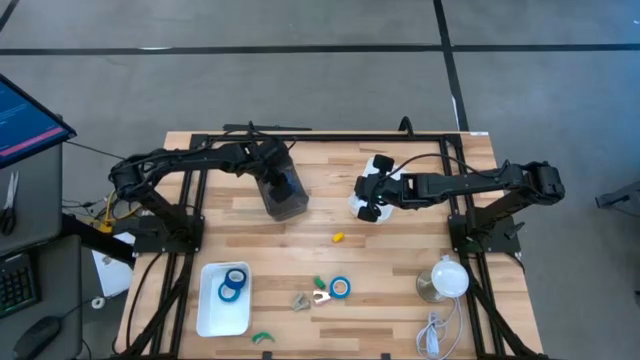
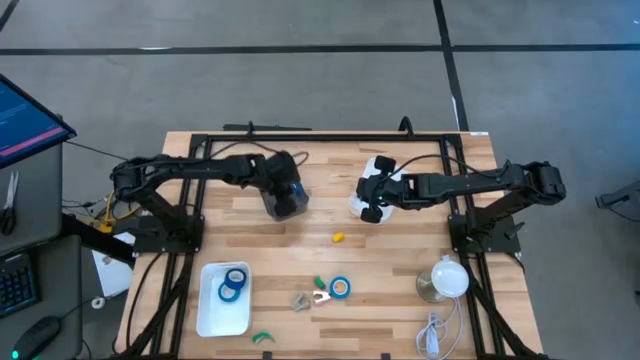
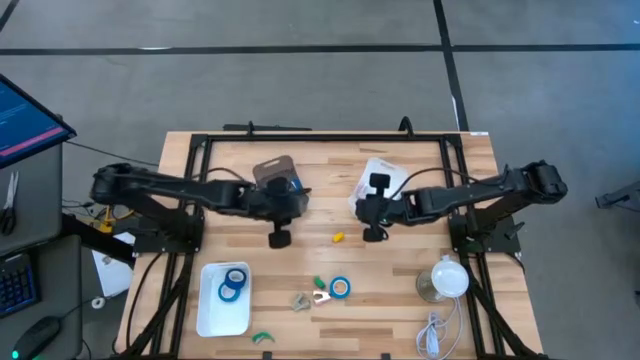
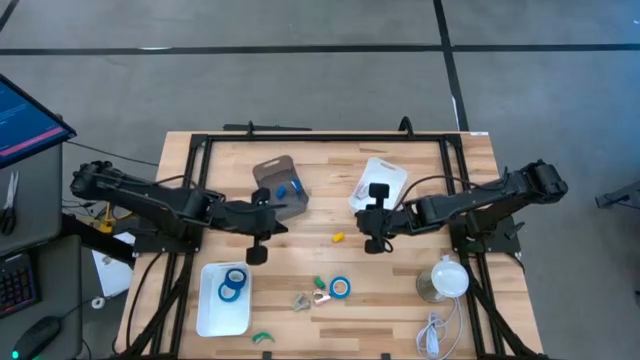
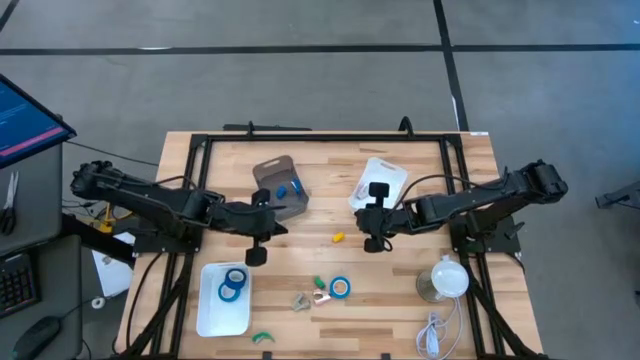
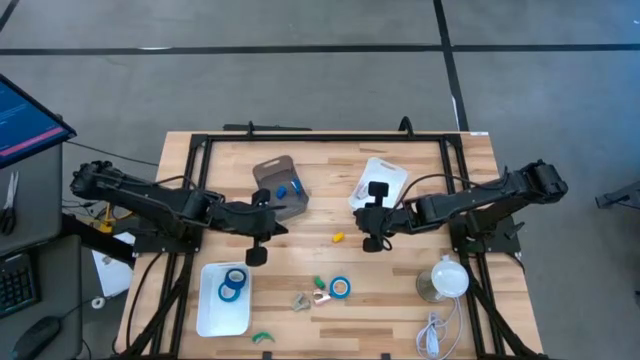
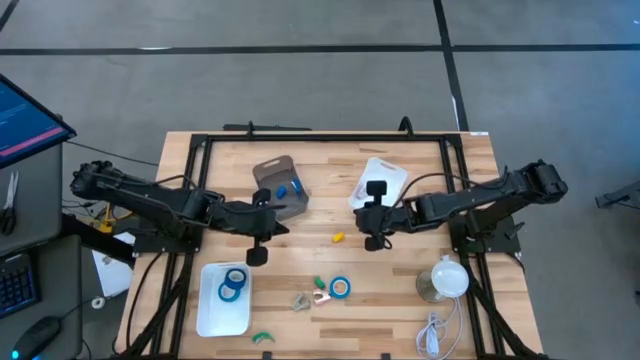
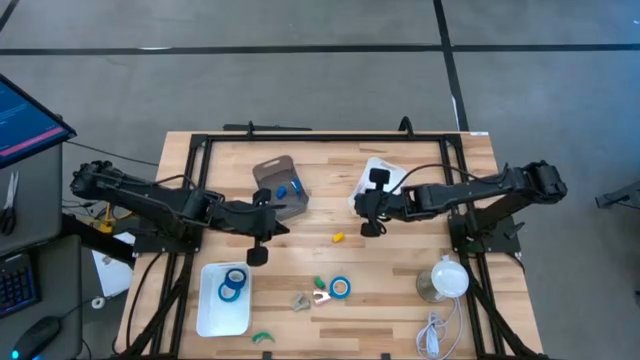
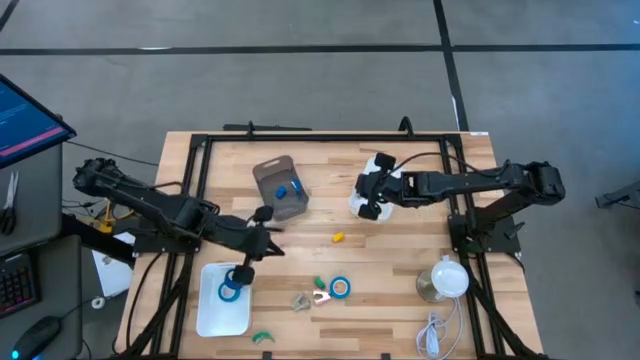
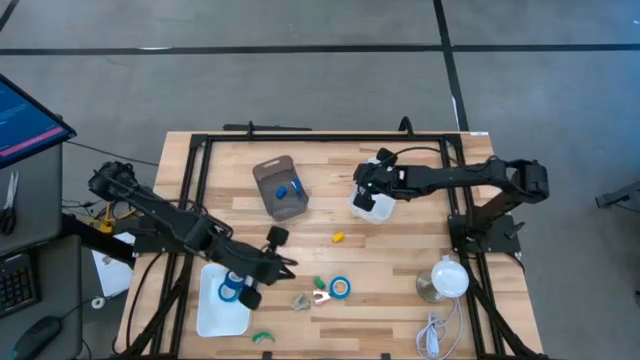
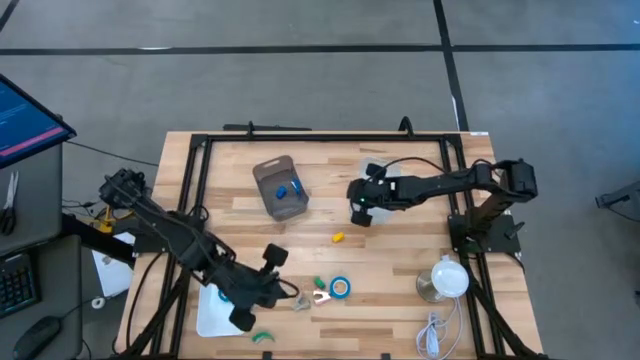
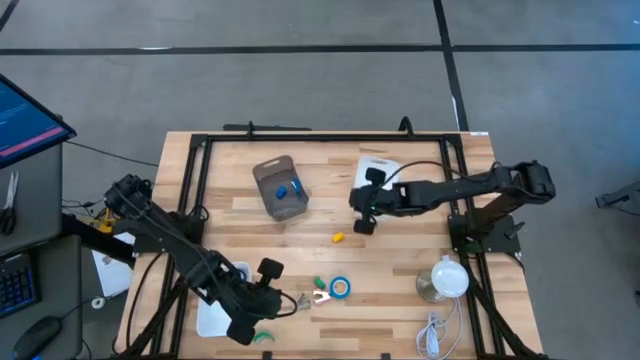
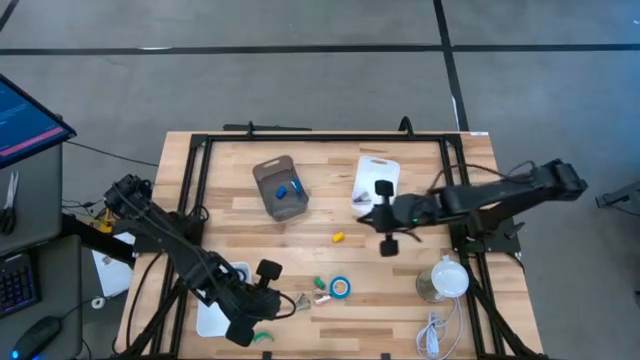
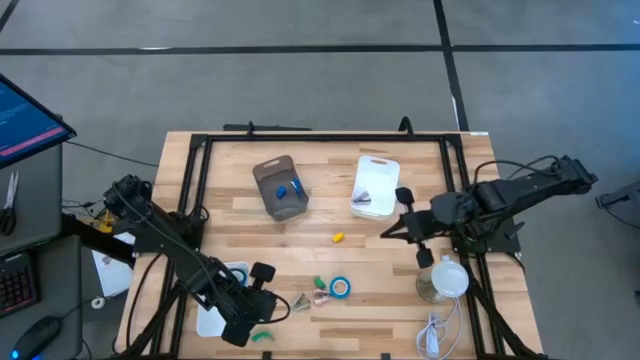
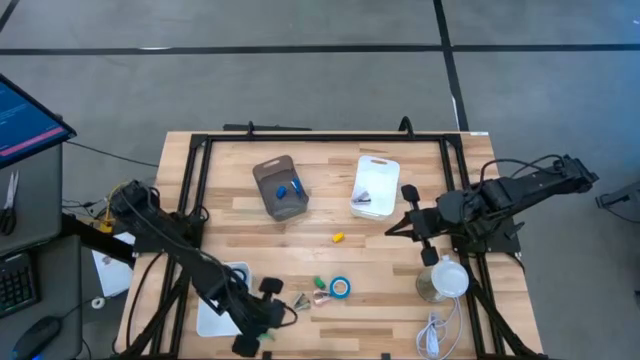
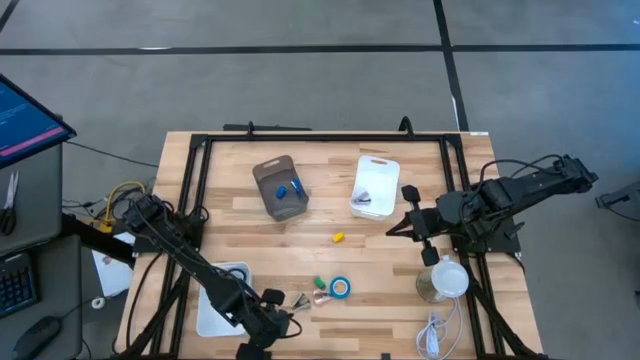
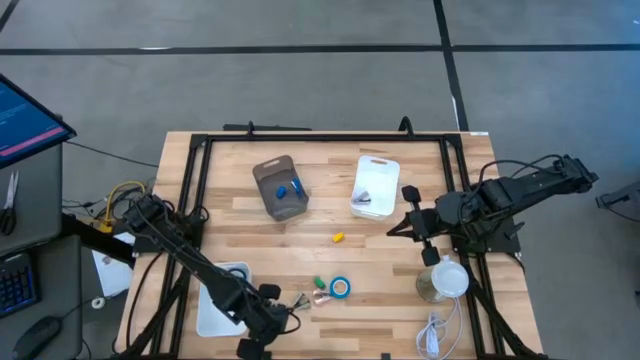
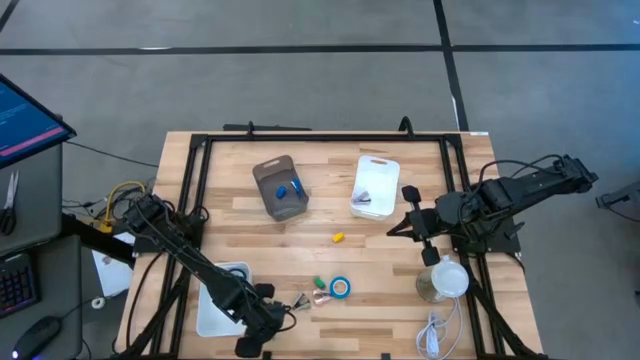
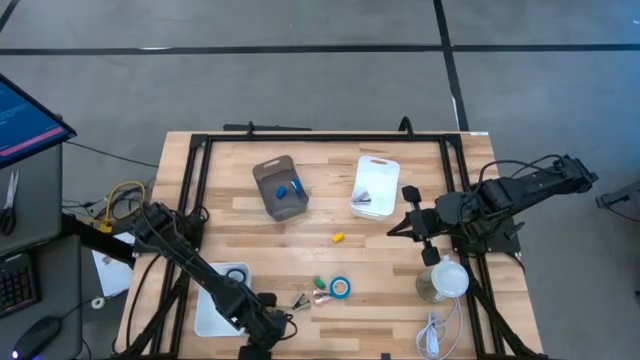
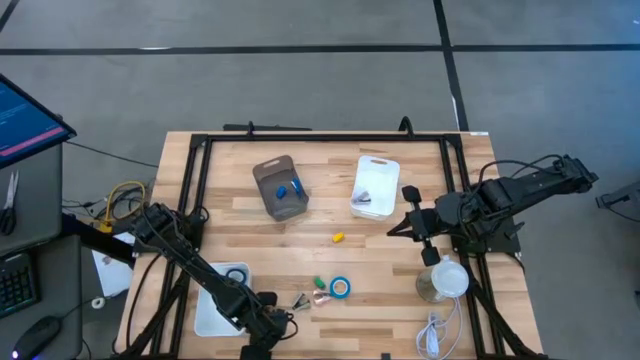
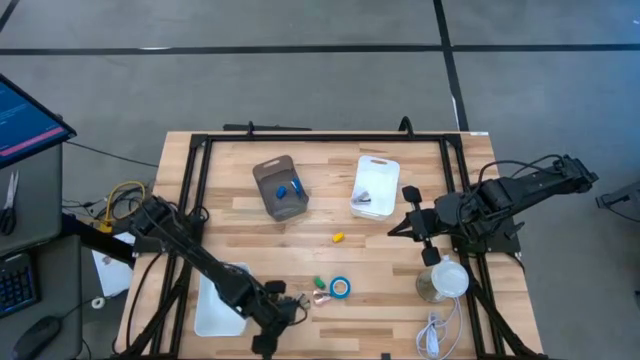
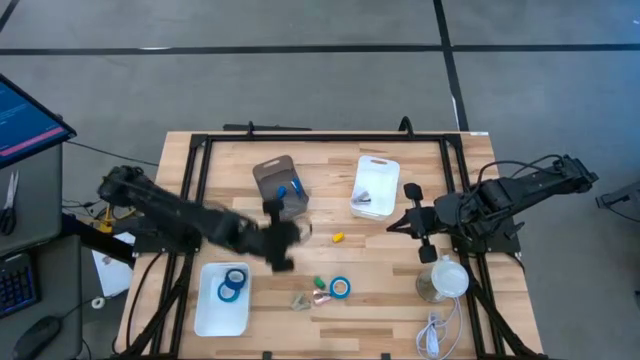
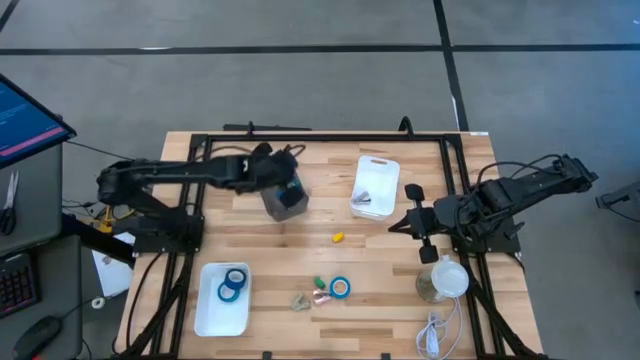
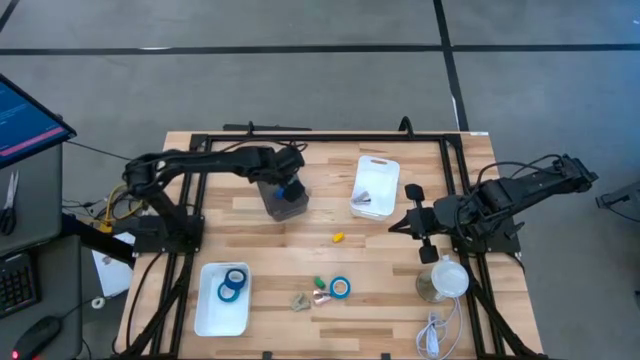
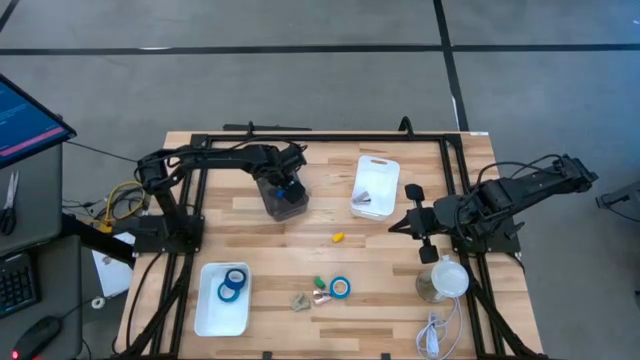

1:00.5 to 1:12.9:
Task: Pick and place Stapler, Stapler remover, tape
Put the green stapler into the black bin

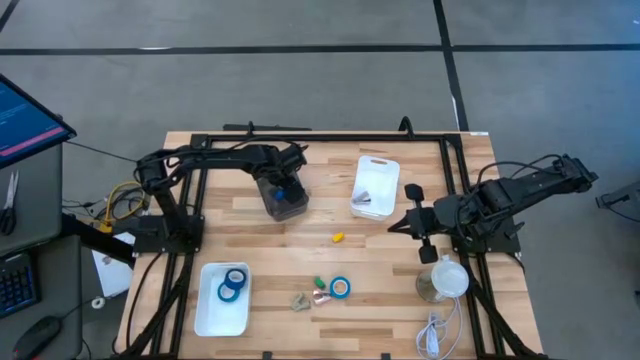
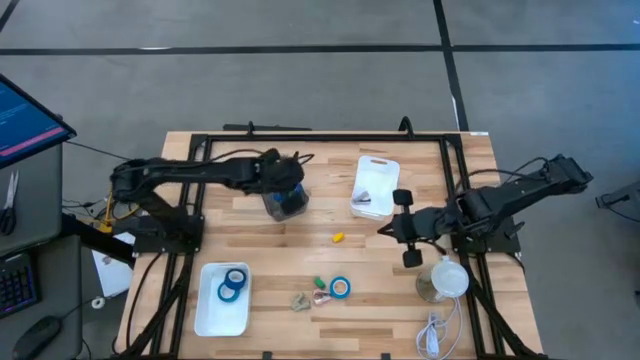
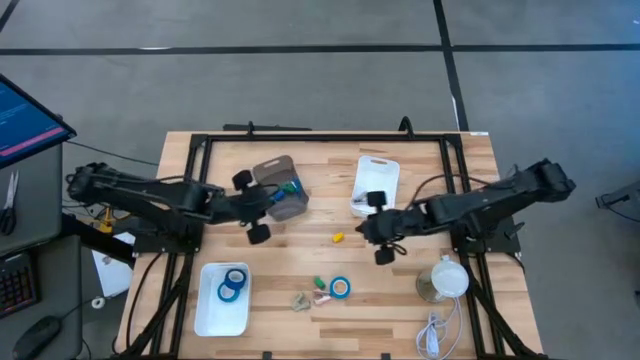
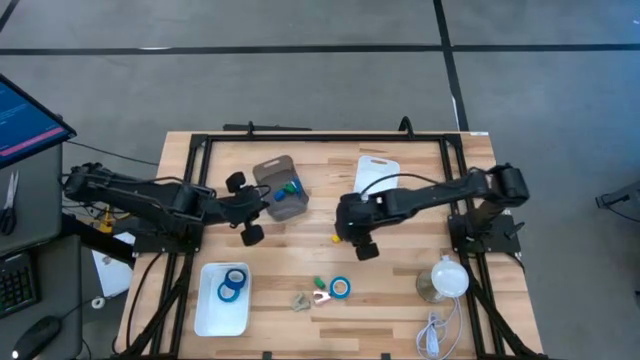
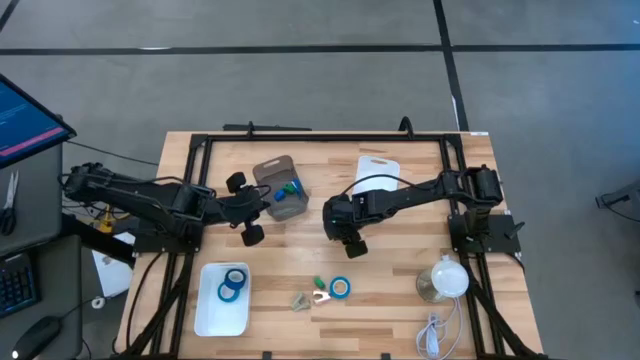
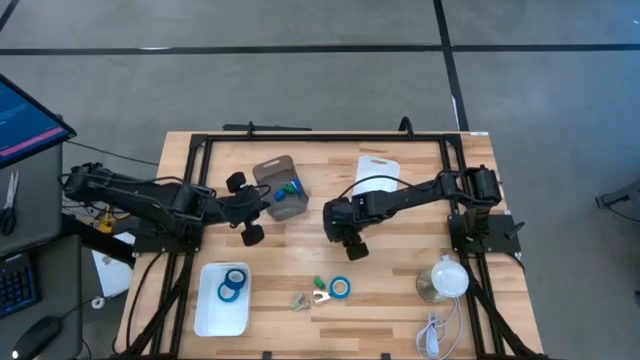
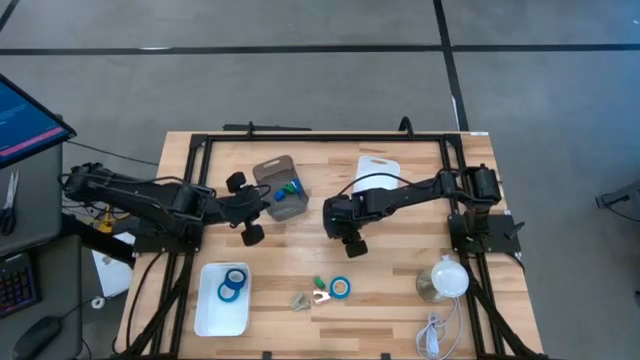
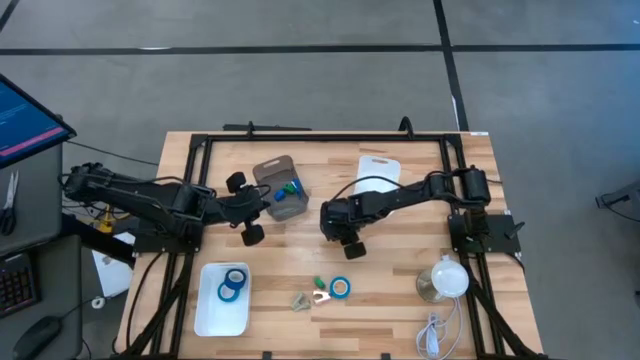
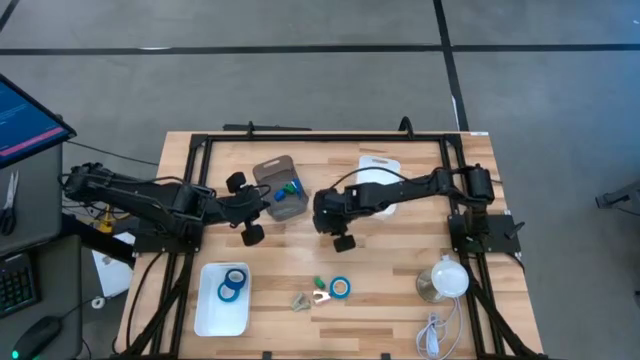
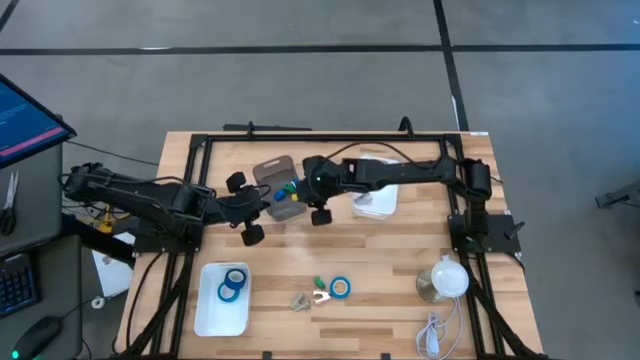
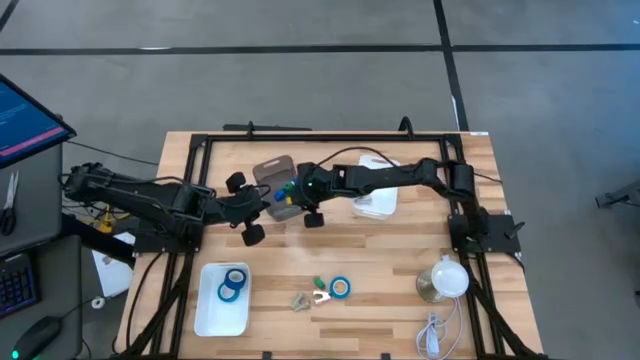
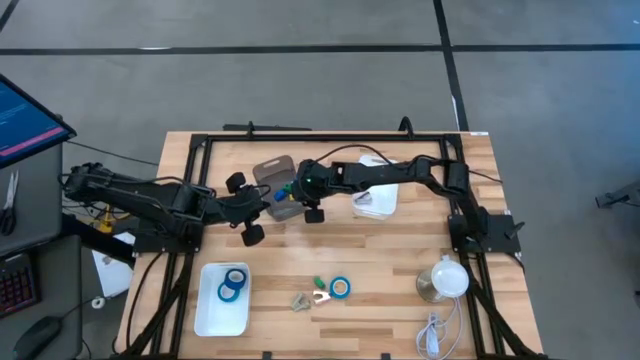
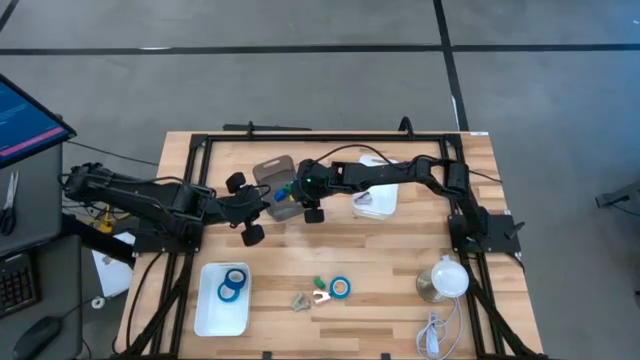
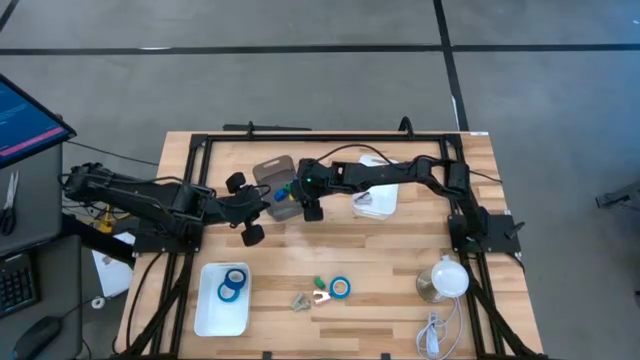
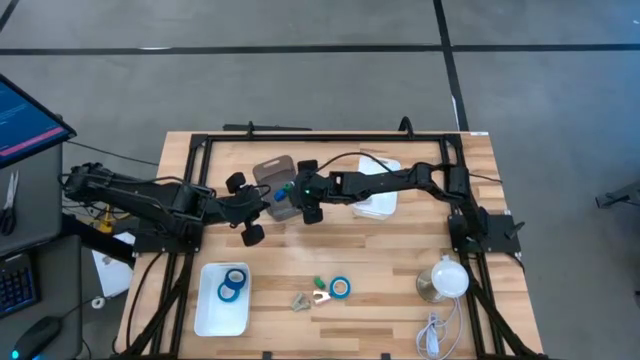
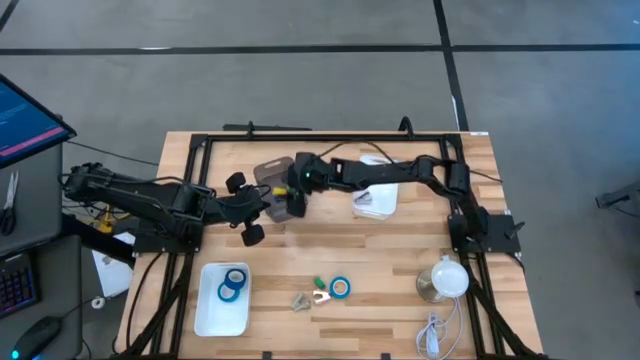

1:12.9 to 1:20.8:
Put the yellow stapler into the black bin

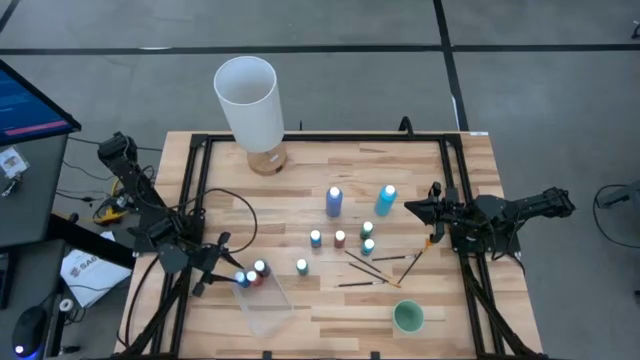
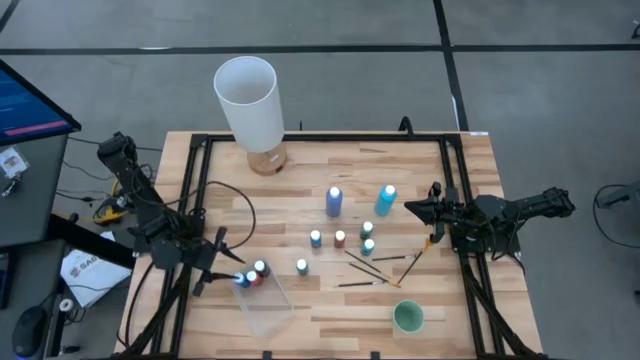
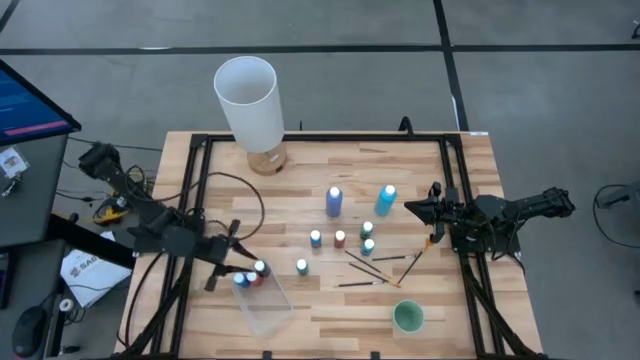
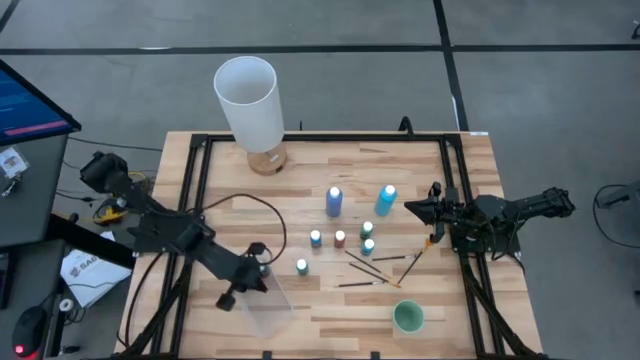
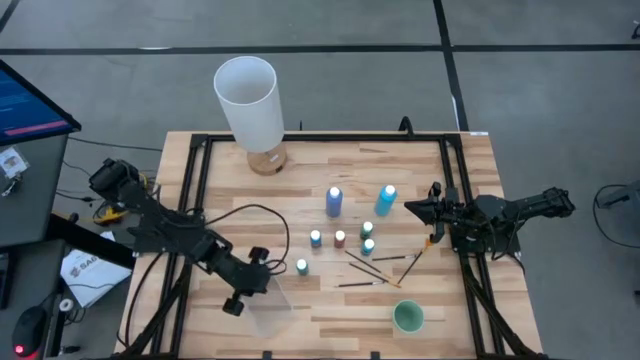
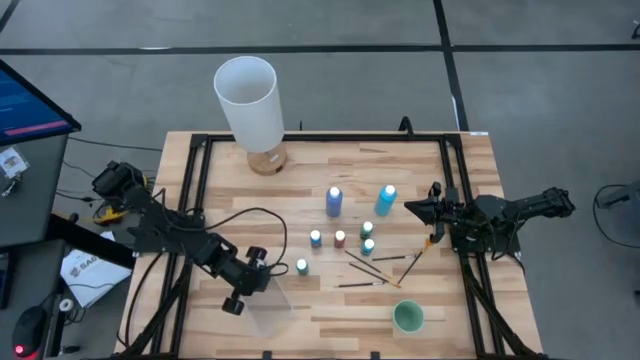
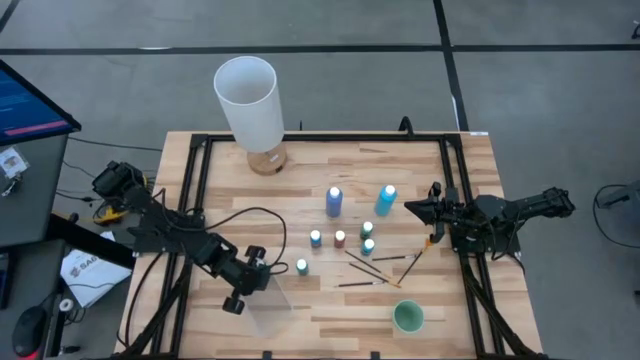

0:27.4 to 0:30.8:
Task: Pick & Place Paint Supplies
Adjust the orange paint bottle in the transparent bin
